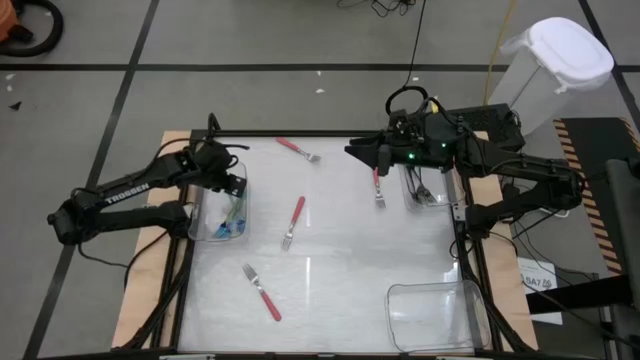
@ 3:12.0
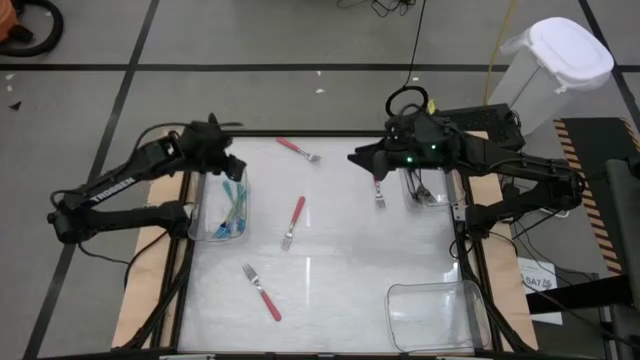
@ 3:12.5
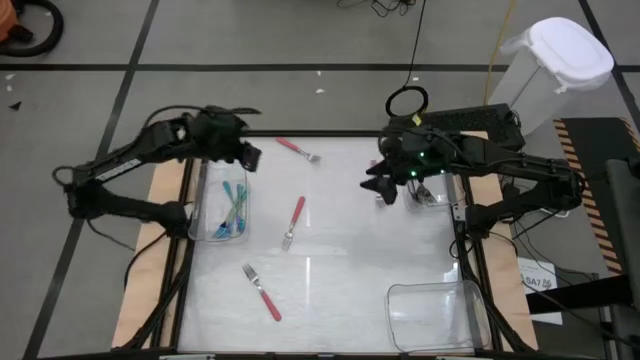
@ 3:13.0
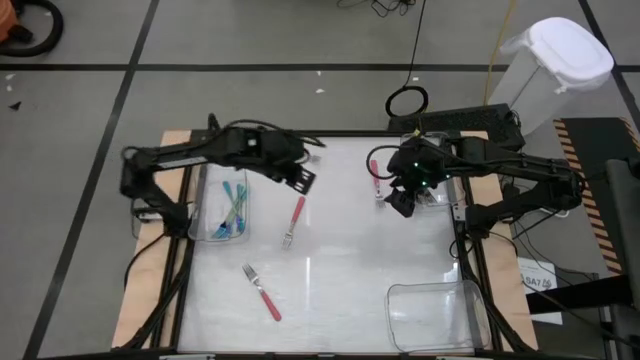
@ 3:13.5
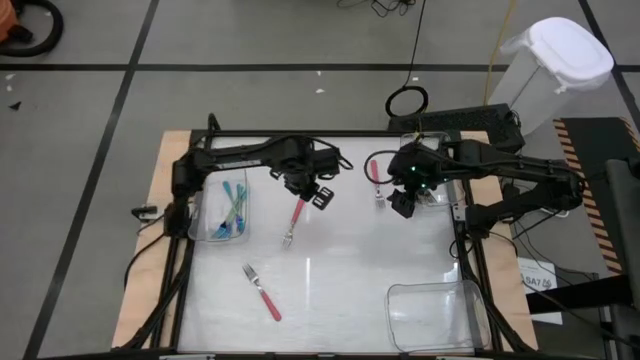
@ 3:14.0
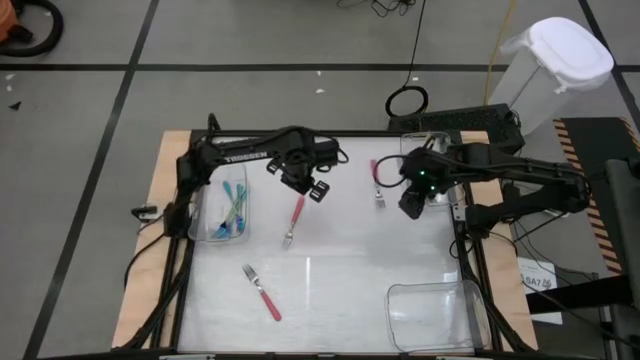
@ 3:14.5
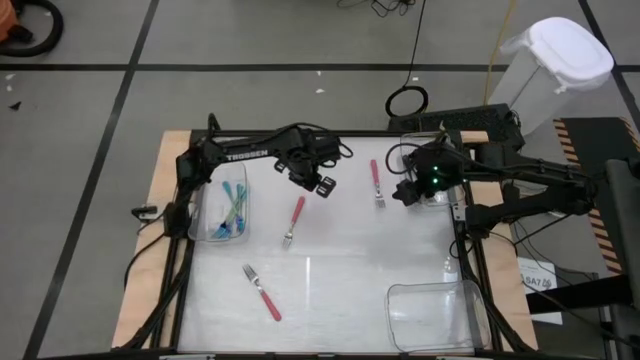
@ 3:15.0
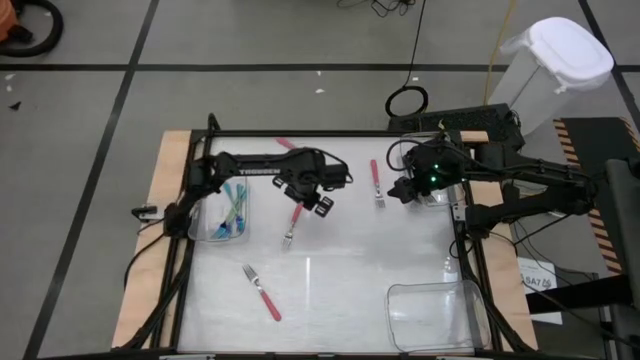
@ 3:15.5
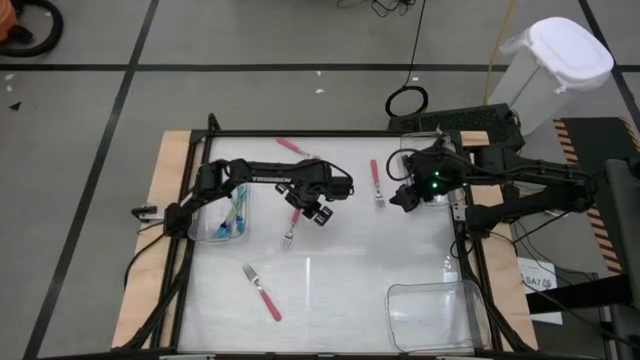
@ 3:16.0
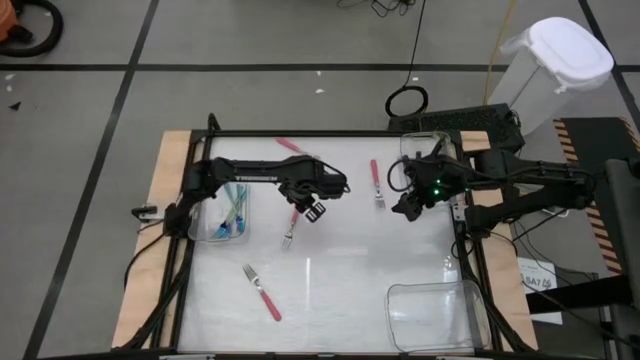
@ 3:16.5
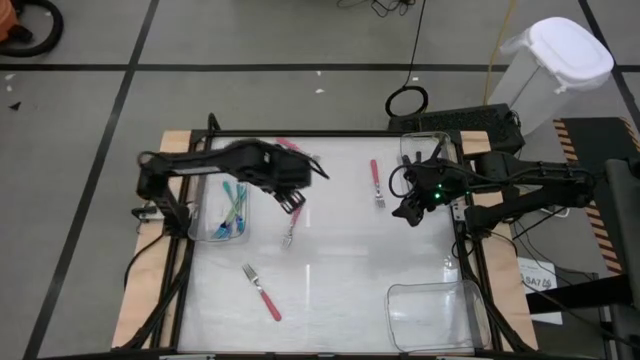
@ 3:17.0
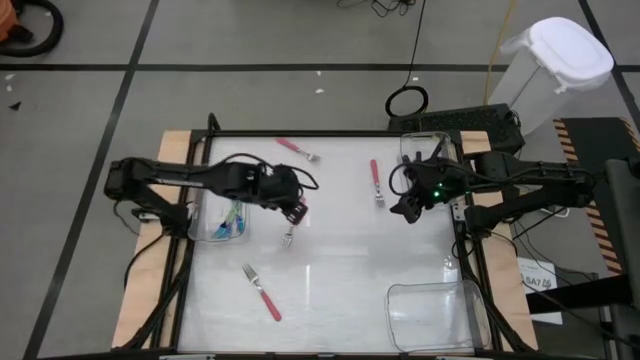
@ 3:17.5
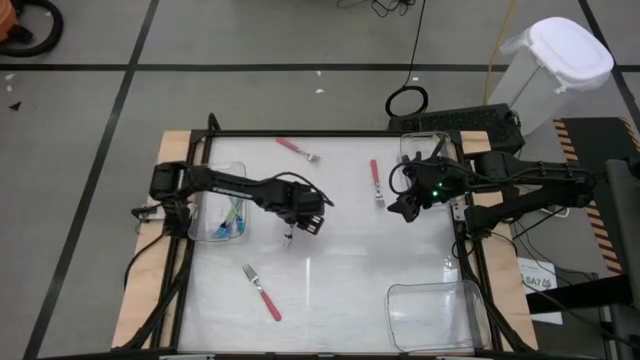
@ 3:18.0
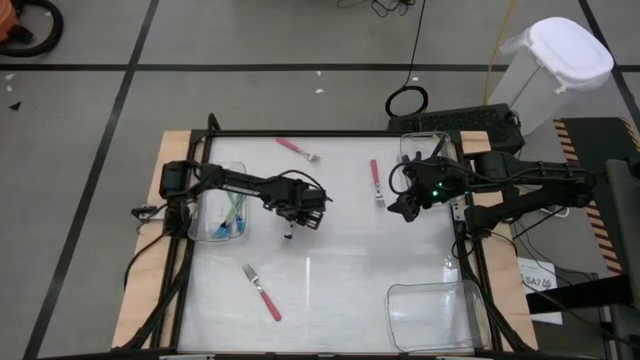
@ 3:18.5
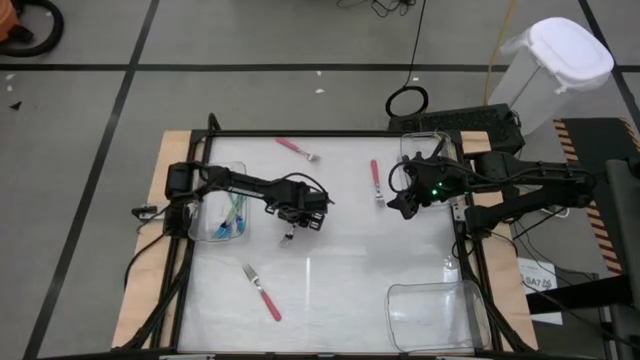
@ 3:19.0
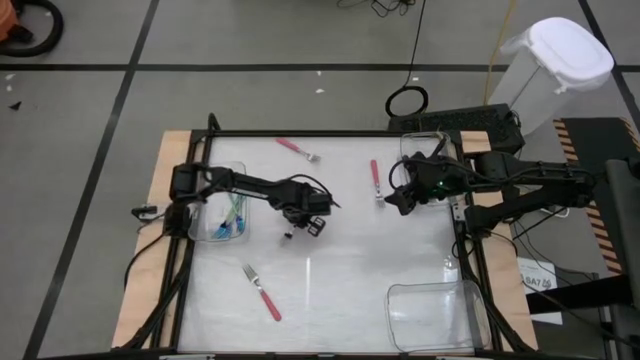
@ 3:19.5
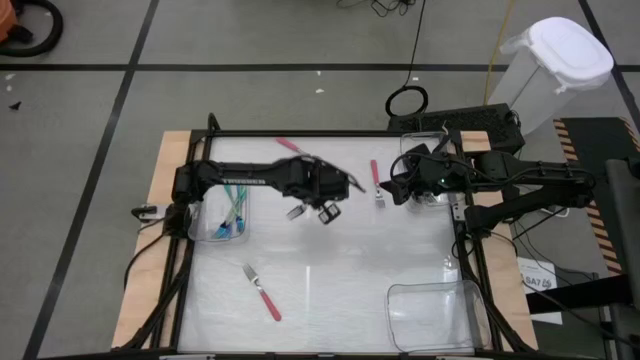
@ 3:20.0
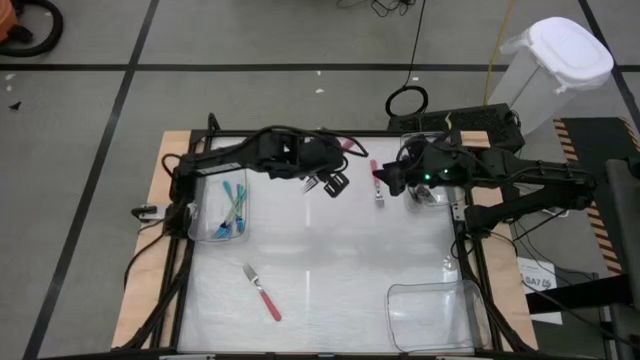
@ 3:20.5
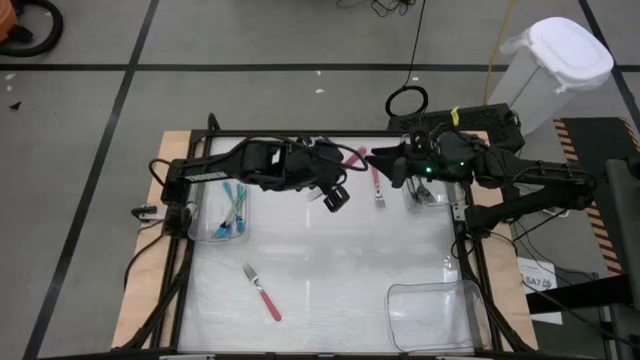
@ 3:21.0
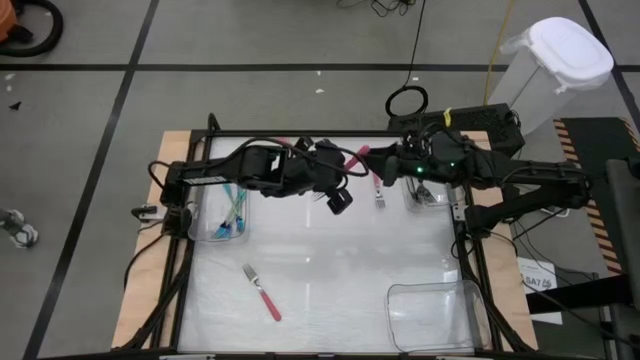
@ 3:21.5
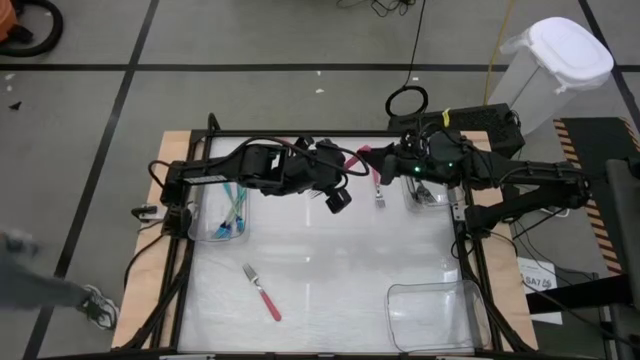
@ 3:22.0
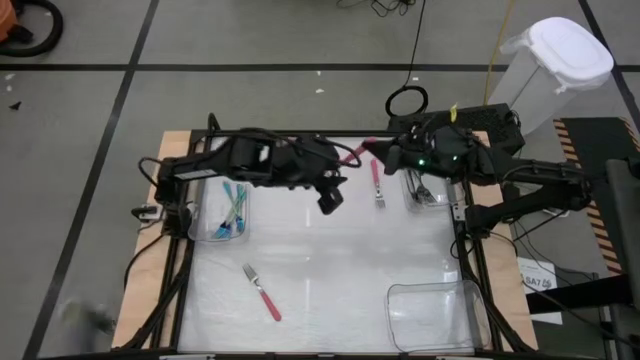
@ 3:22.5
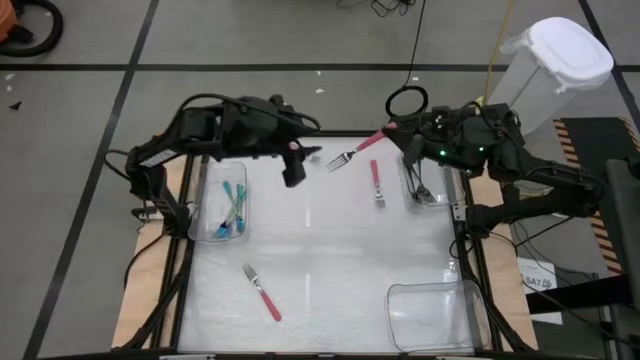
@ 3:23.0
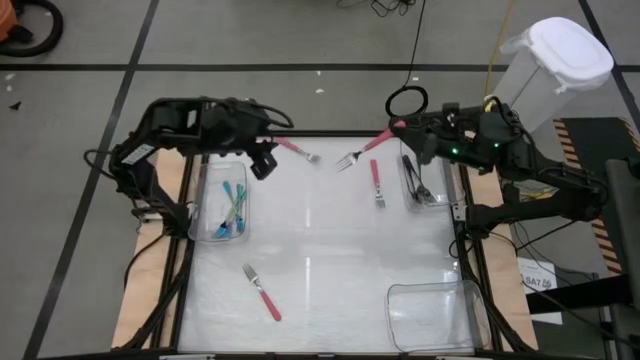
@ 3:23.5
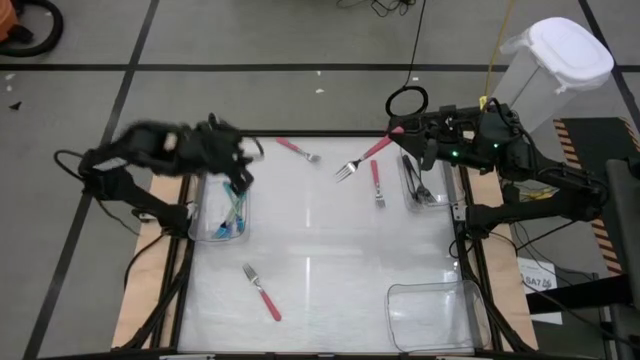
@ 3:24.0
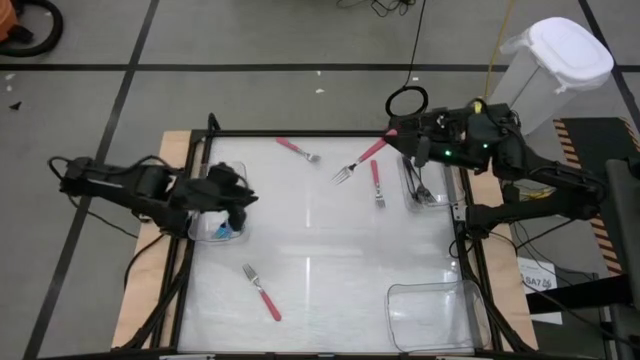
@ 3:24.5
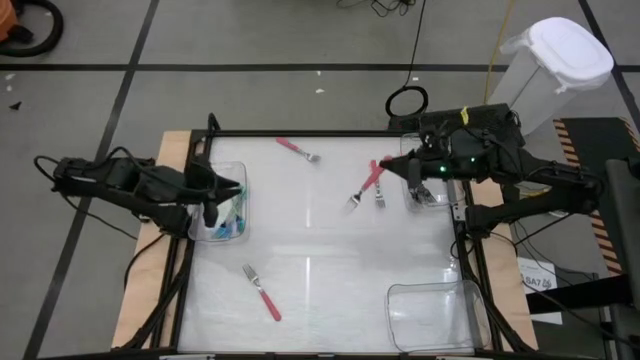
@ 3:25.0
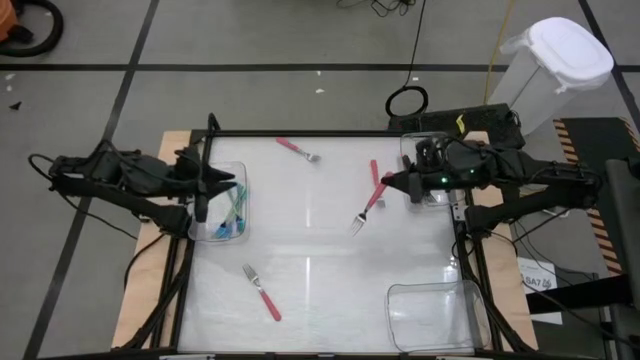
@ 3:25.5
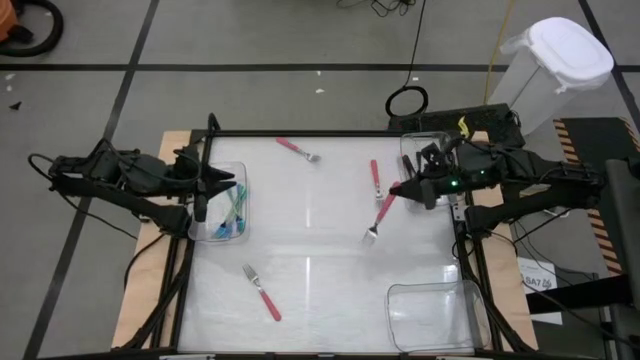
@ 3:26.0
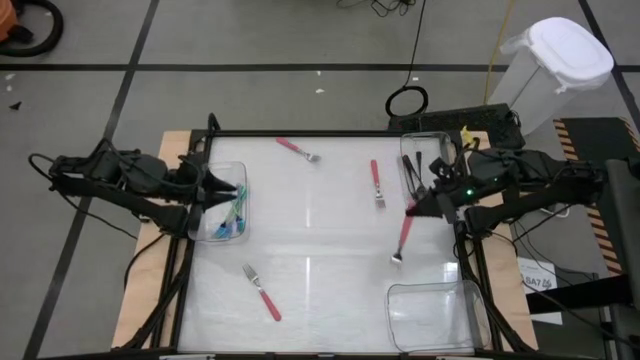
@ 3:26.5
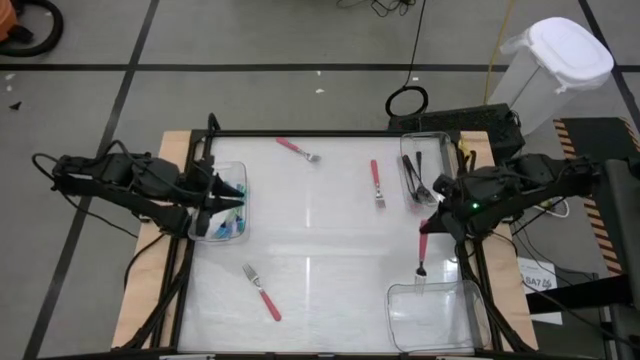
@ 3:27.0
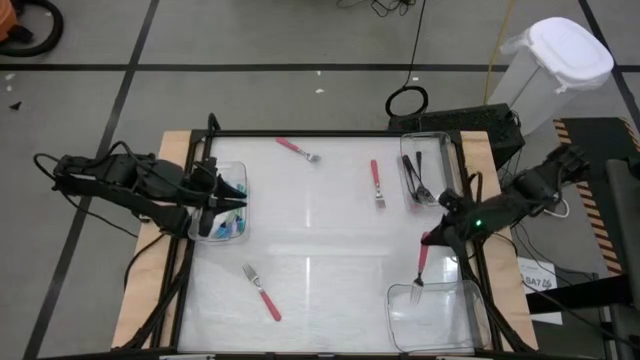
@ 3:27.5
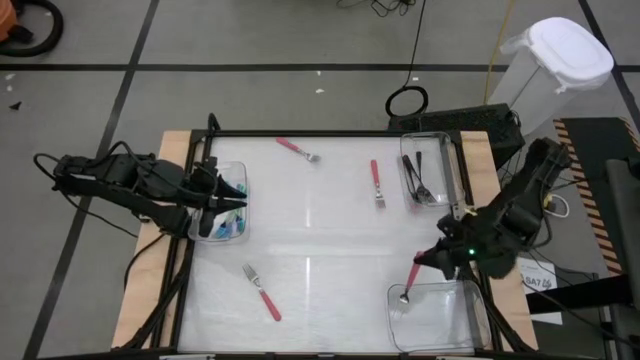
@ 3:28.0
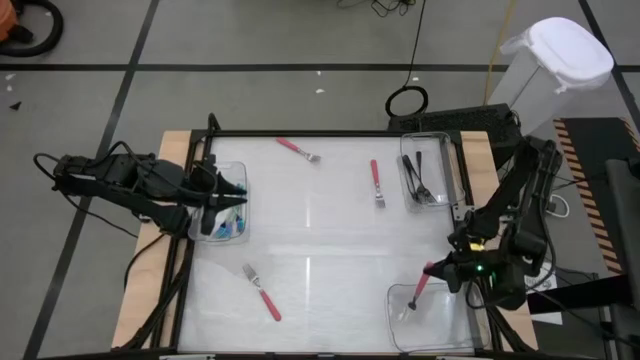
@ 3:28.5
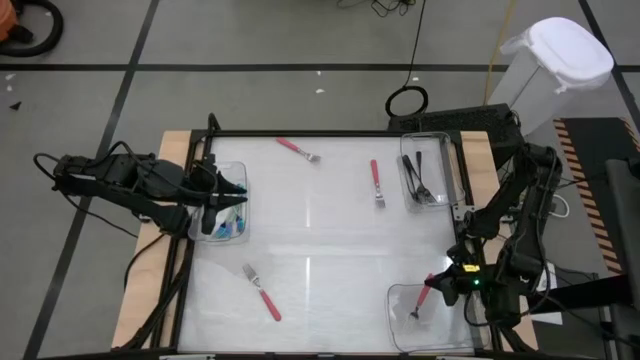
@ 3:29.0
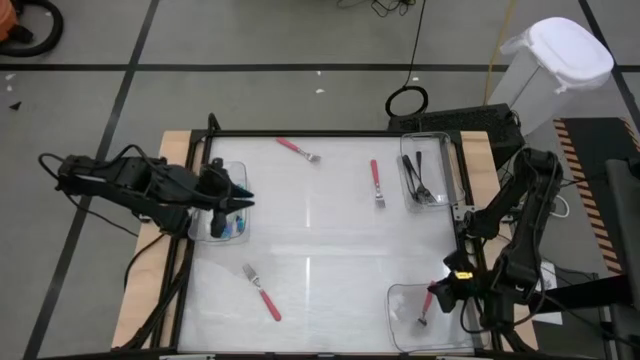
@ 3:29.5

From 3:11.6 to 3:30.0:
Task: Sort silverware by color (type)
Put the pink fork into the bottom right transparent bin

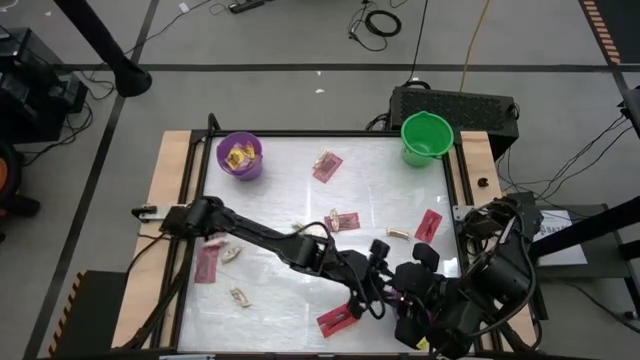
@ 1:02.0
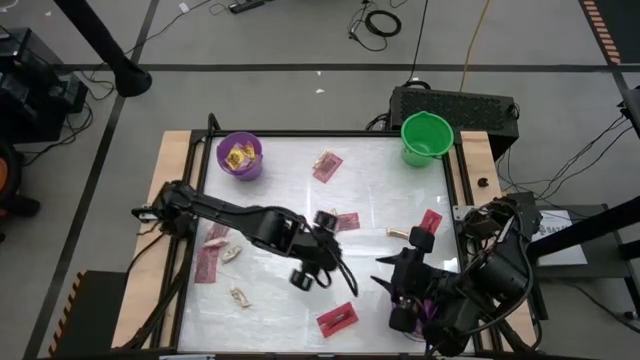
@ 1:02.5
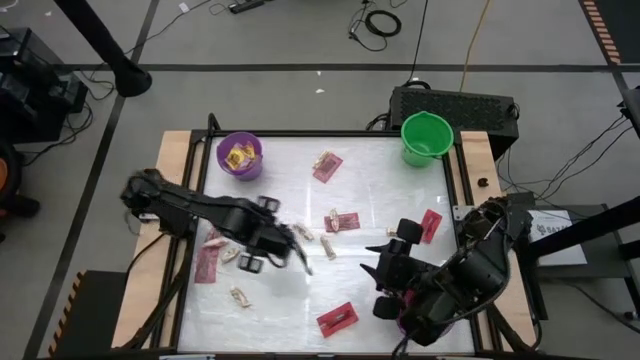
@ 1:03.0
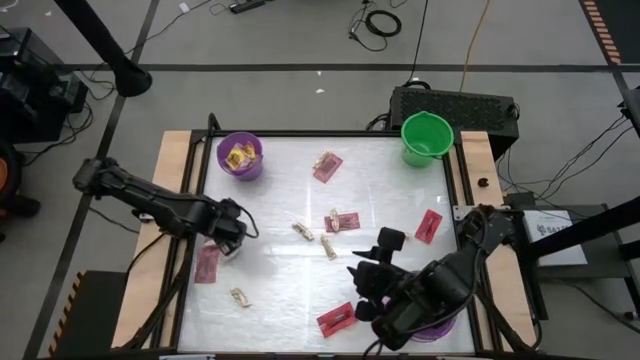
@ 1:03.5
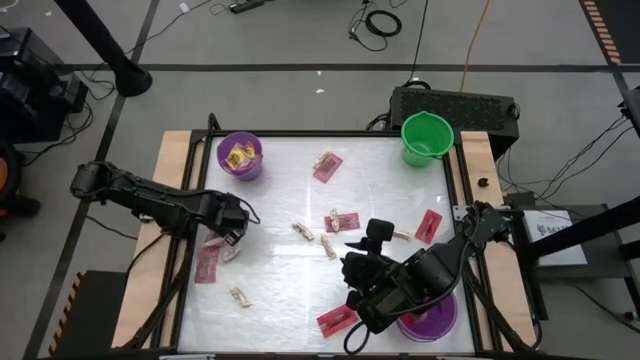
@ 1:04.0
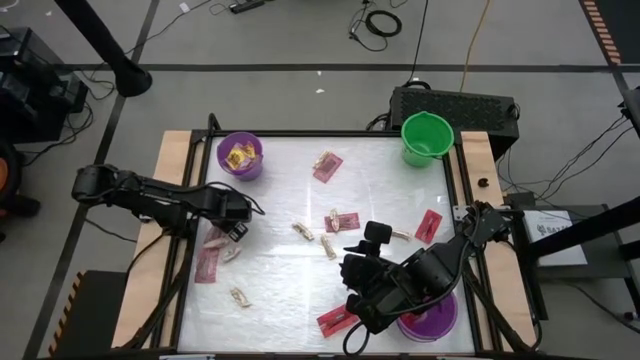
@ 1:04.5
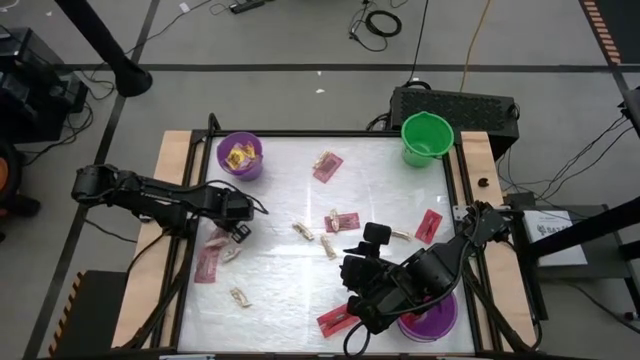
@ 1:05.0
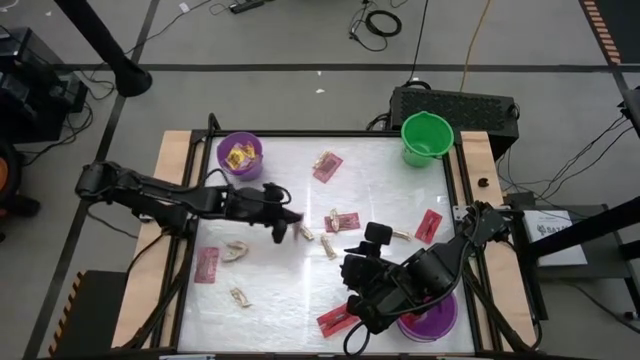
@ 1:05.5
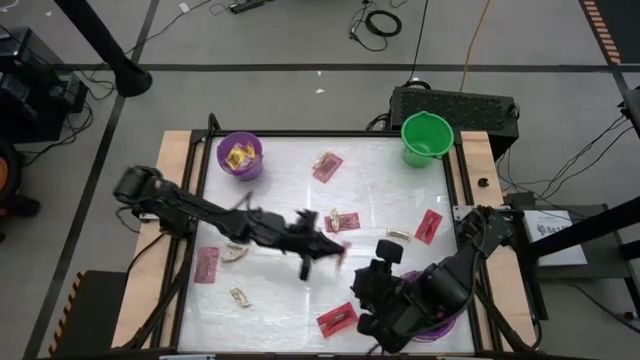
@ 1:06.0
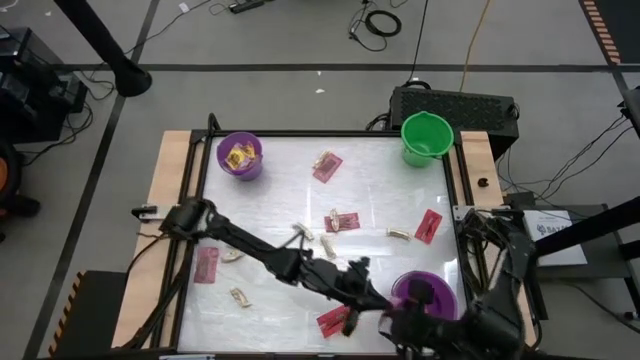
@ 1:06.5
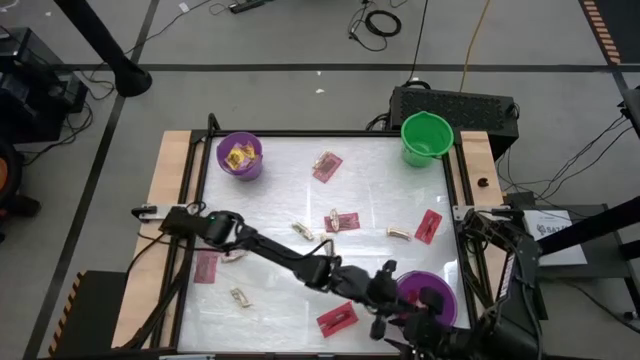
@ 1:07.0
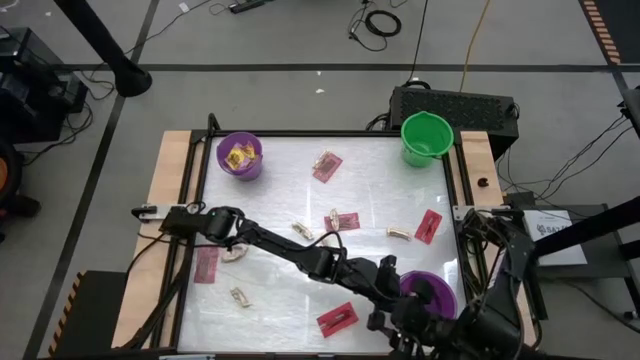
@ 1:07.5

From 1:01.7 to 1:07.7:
Task: Sort candy by brand, put in halloween buckets
Put the red candy into the bottom violet bucket
